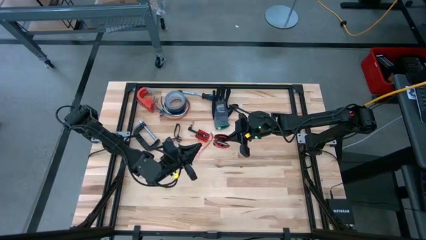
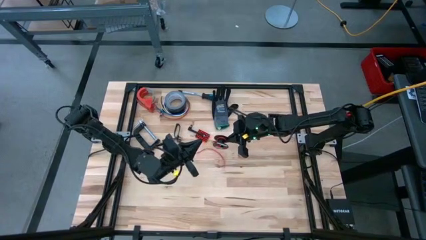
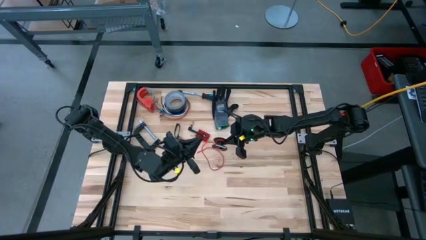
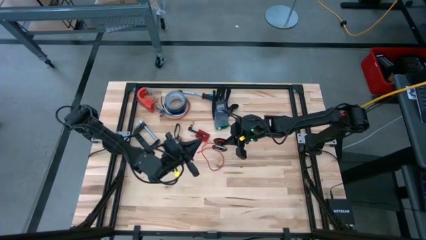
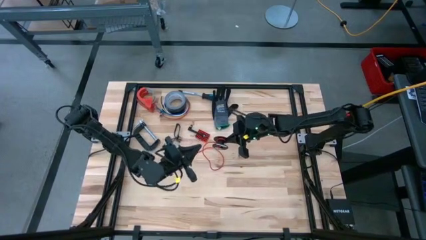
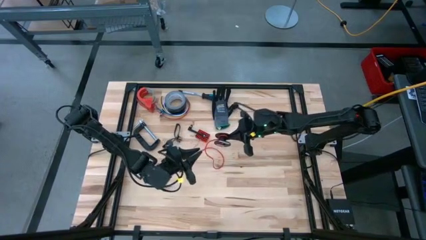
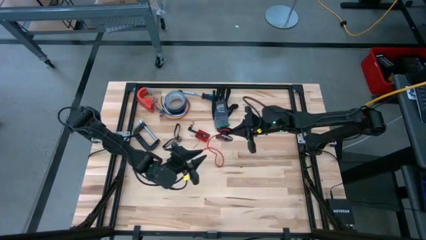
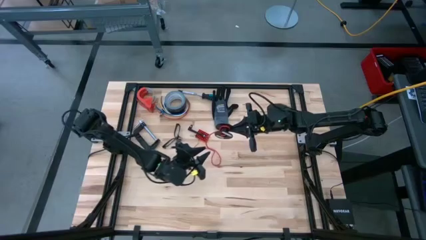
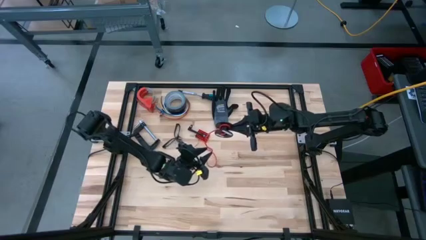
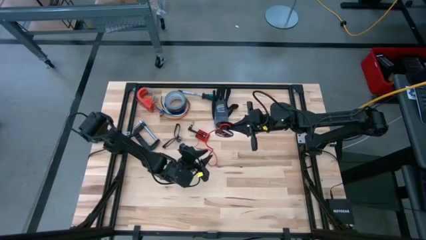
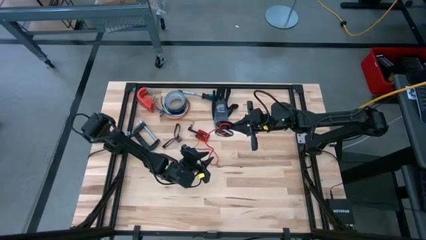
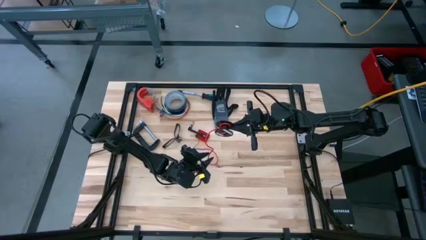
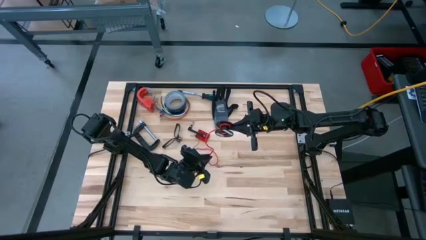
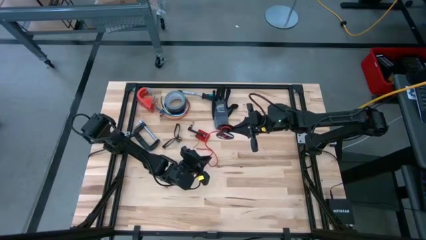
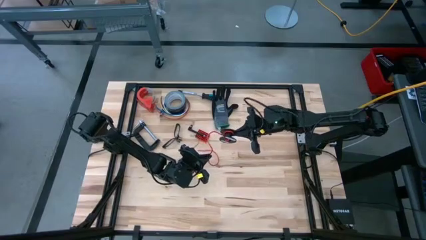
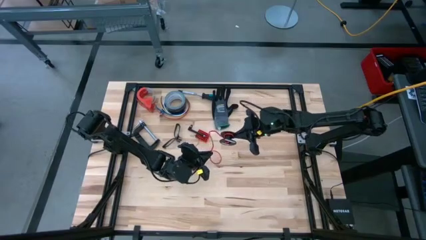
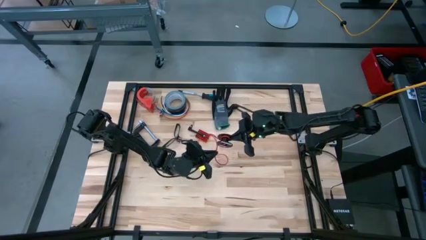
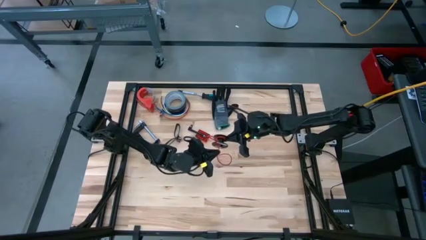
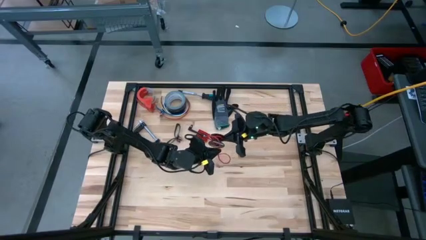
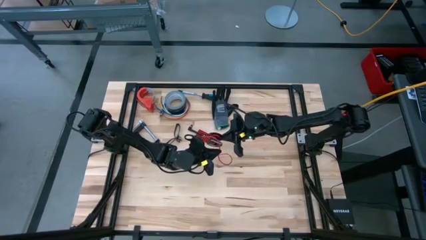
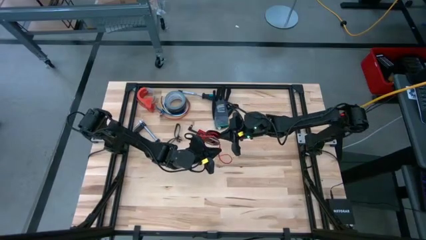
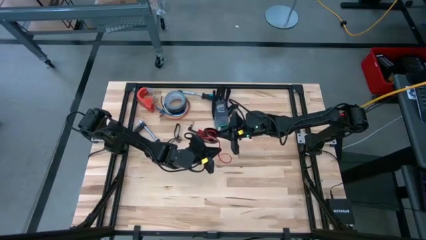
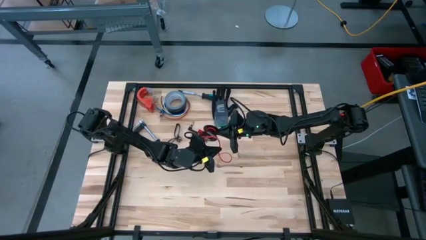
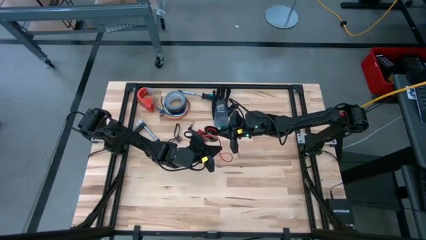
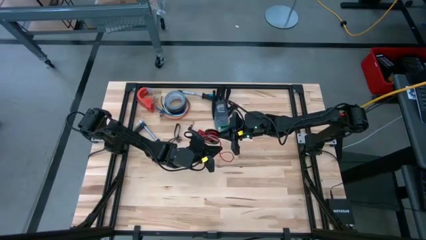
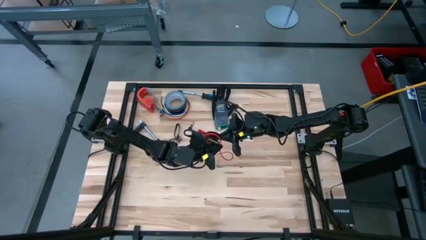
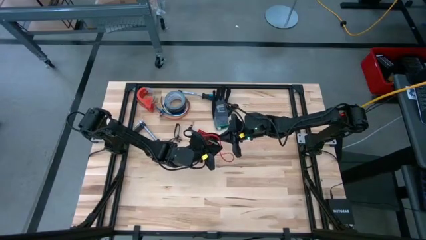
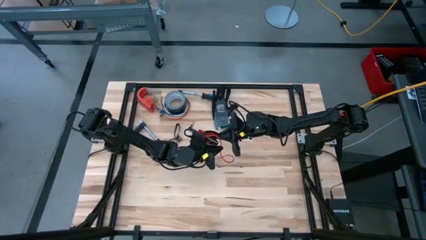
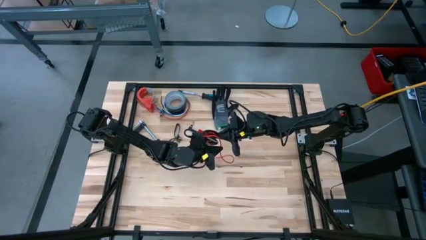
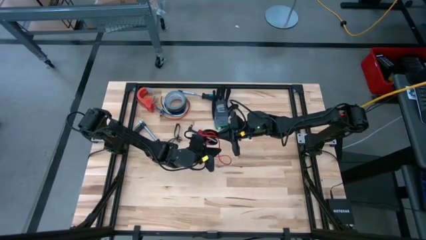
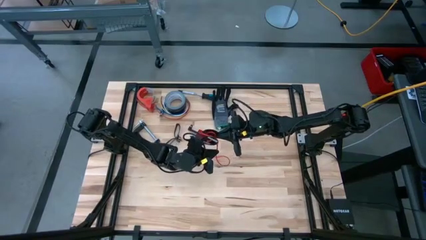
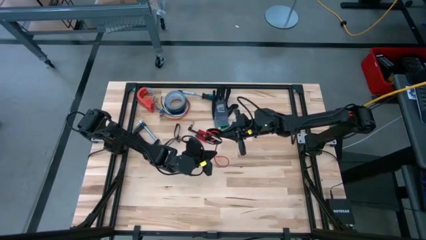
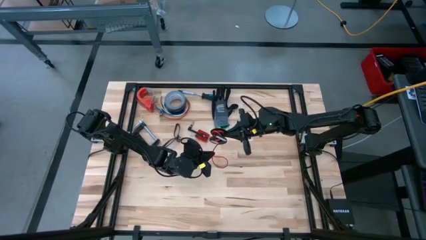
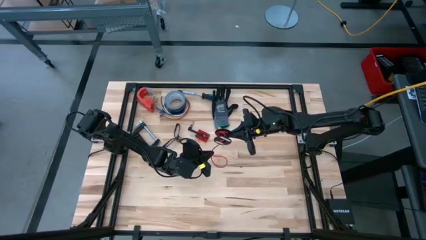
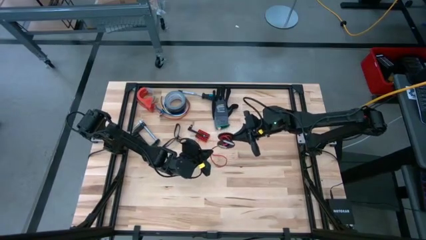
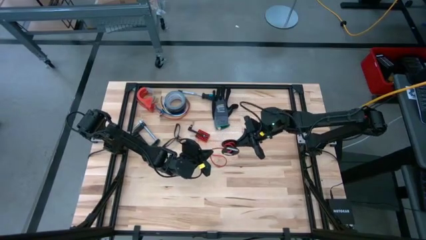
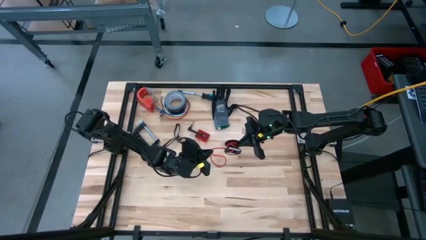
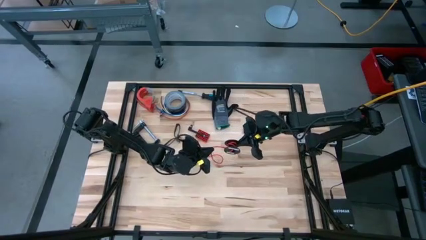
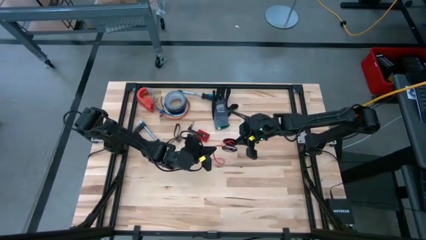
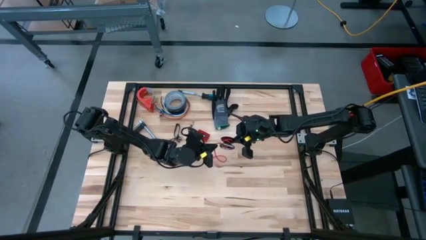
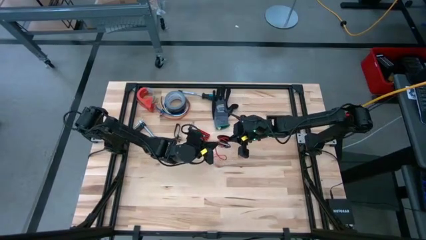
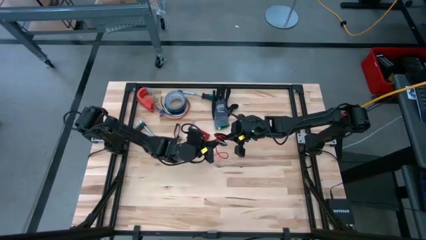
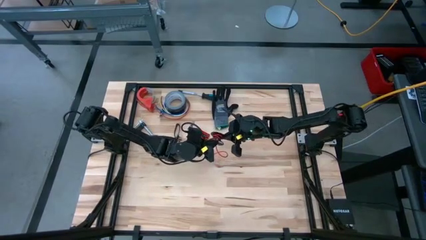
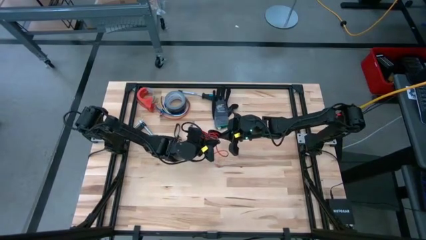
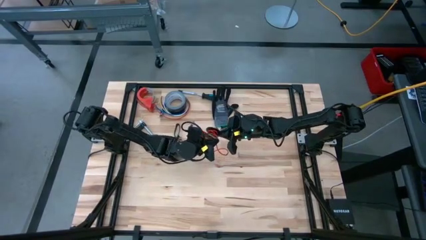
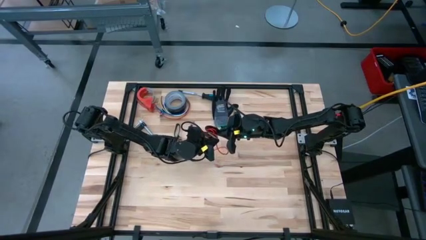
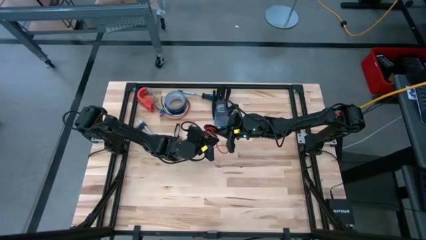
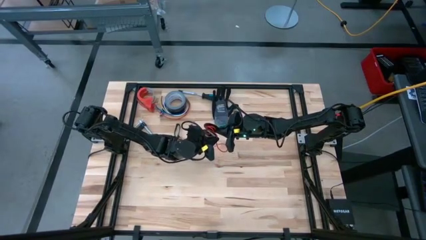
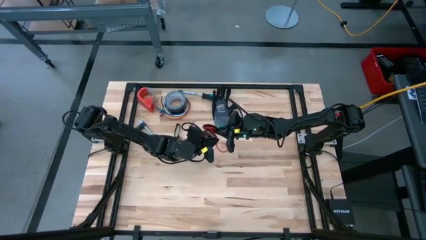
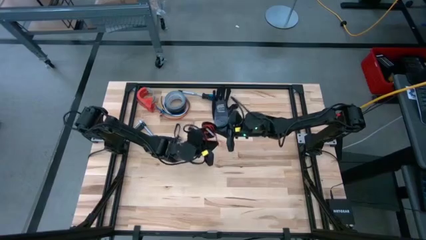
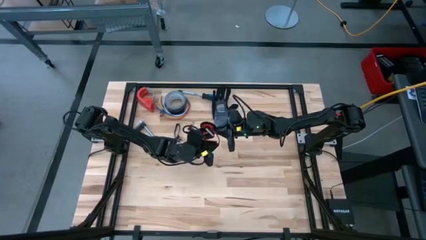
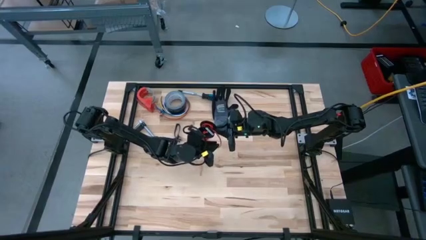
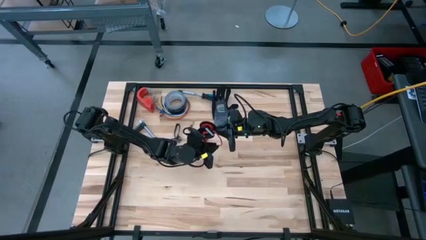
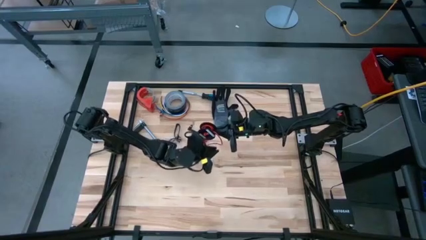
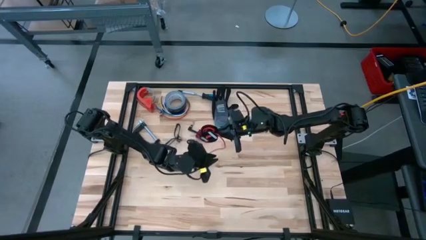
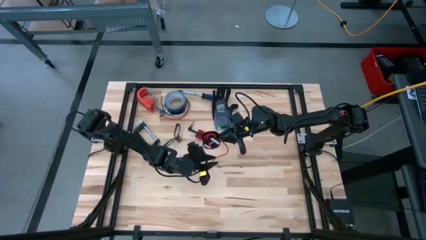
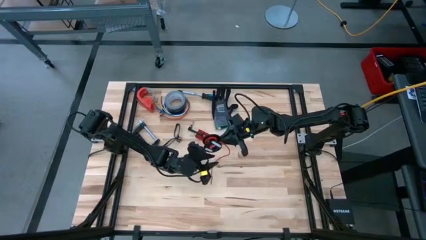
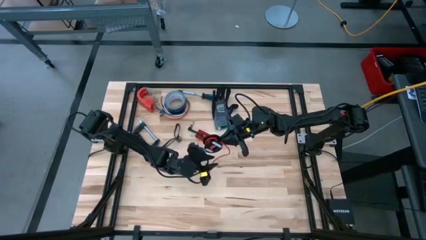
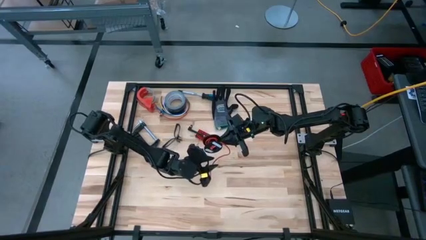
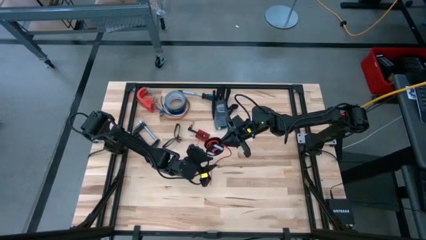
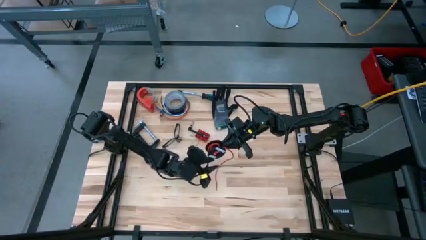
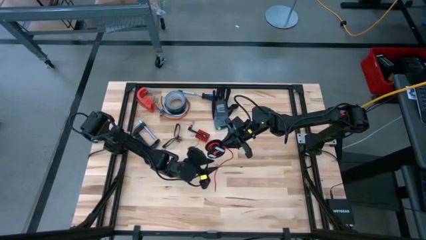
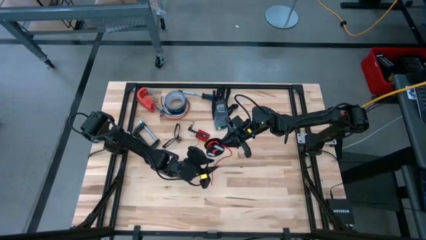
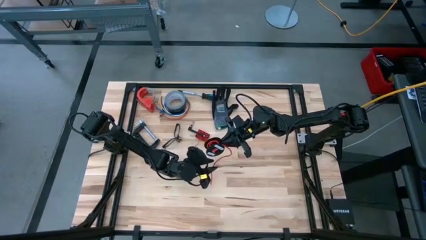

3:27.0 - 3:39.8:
Task: Coil cords
Coil the orange wire into the black spool

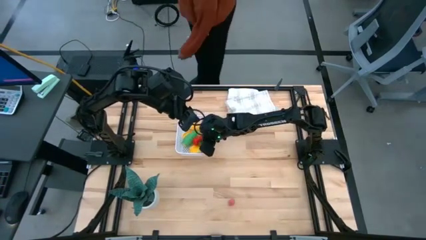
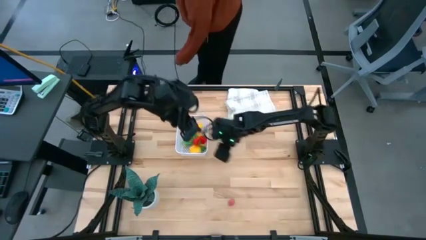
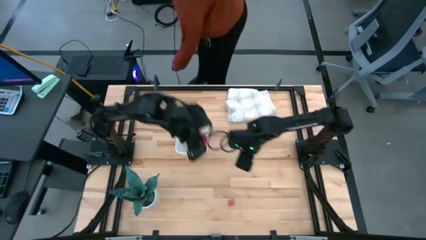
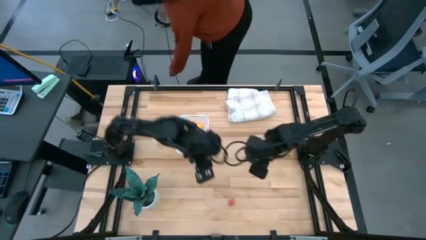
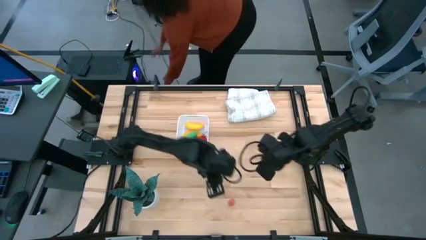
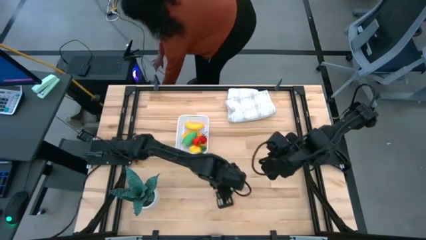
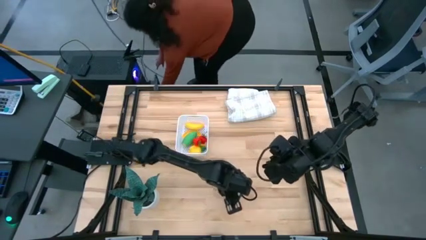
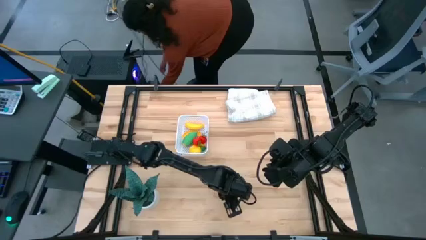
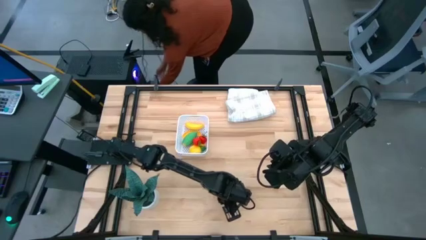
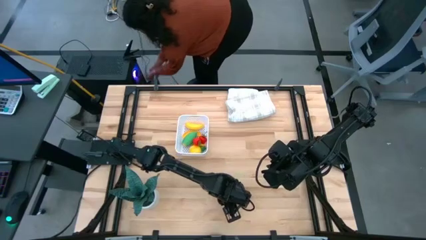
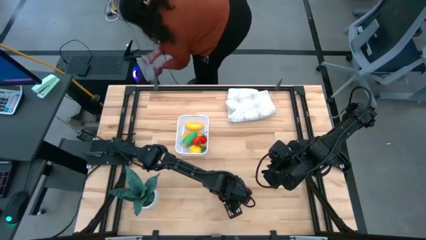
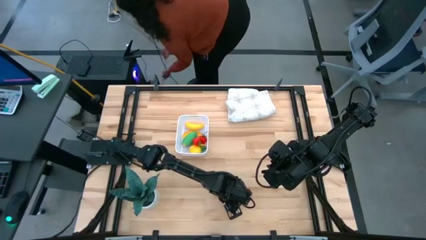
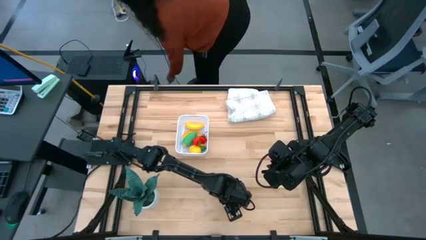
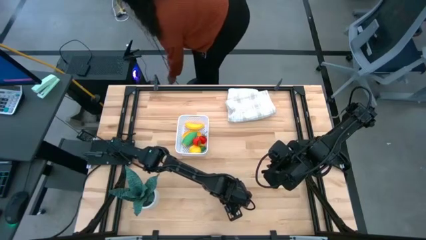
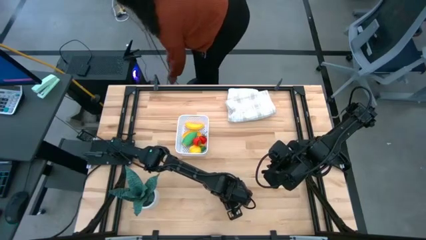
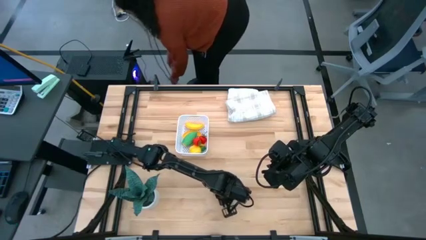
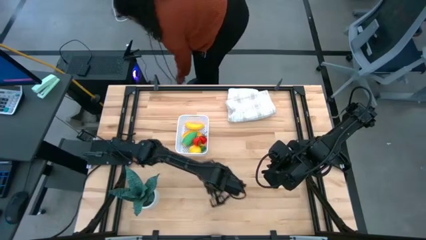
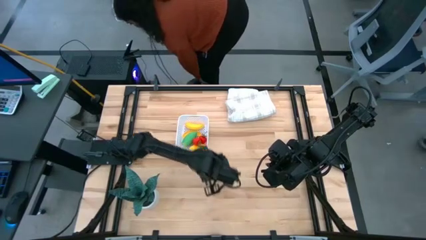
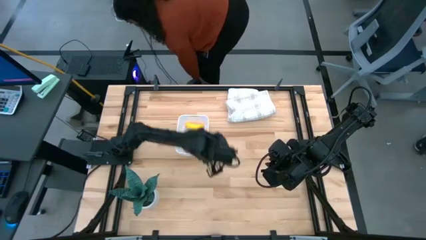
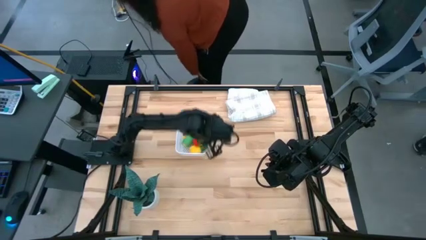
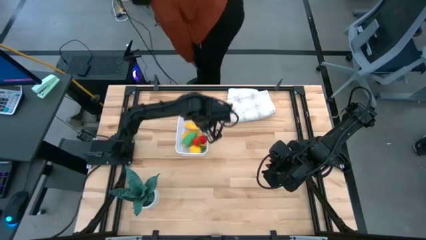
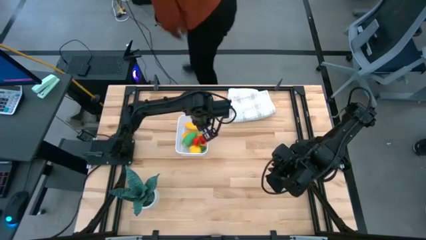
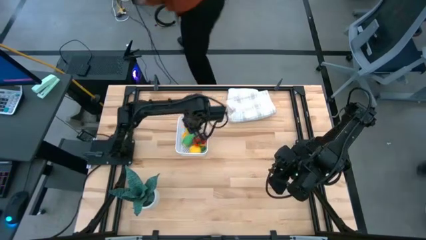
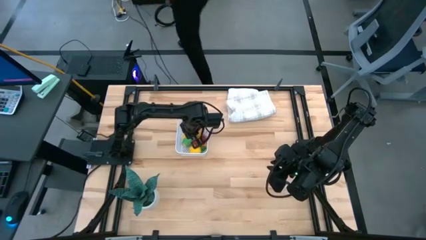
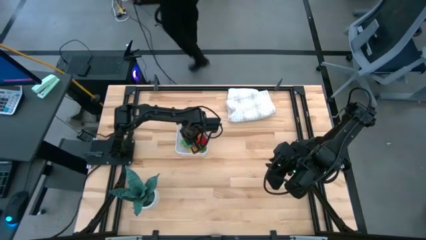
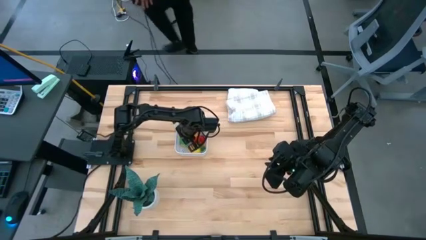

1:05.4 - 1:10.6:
Task: Pick and placing Produce into tupperware
Put the peach into the transparent bin
